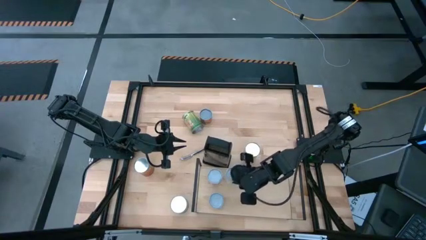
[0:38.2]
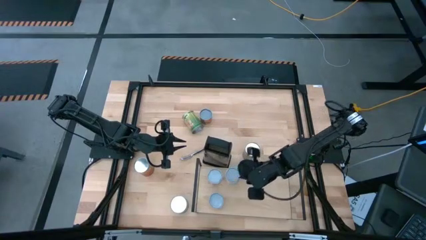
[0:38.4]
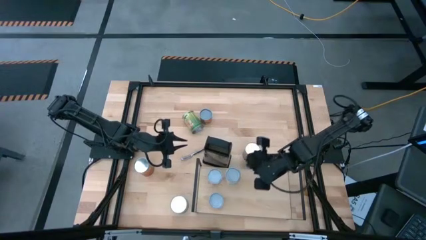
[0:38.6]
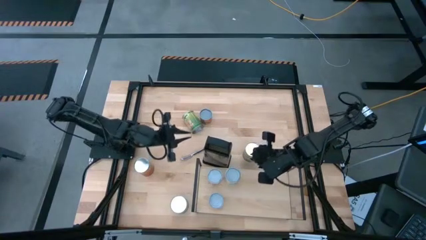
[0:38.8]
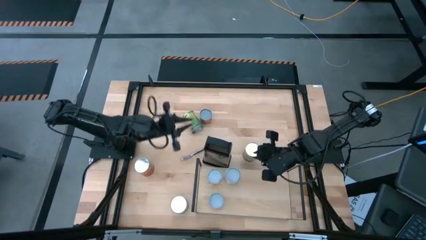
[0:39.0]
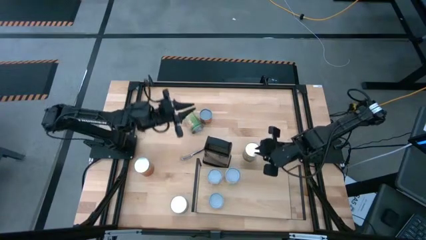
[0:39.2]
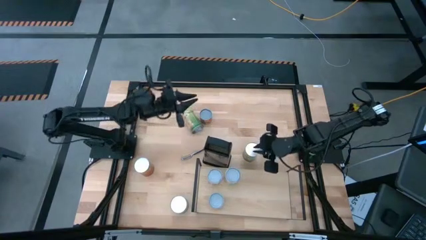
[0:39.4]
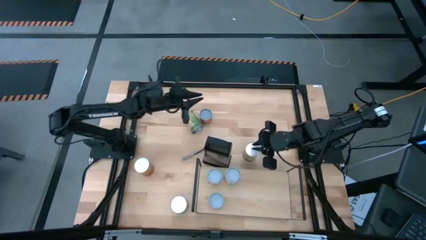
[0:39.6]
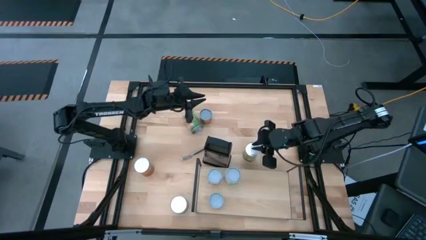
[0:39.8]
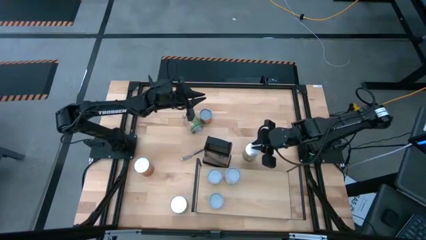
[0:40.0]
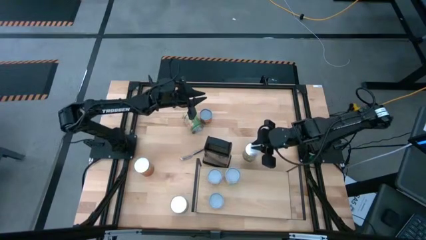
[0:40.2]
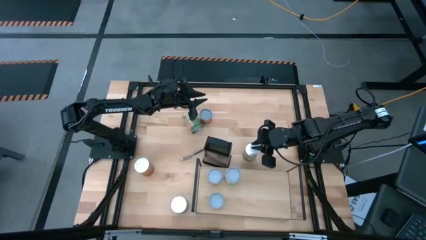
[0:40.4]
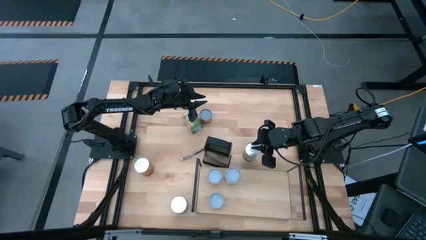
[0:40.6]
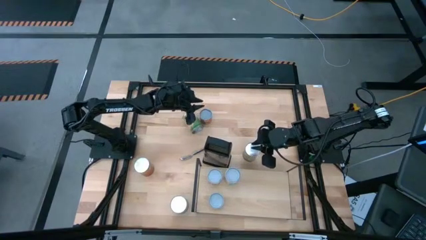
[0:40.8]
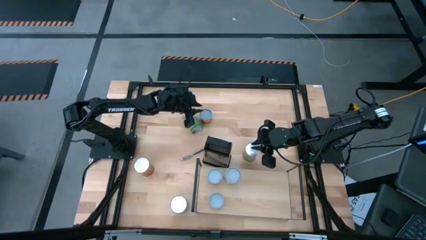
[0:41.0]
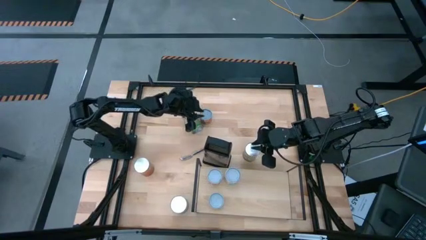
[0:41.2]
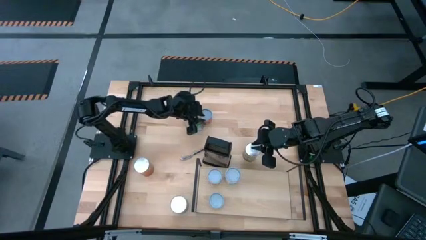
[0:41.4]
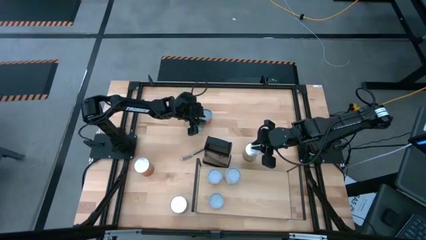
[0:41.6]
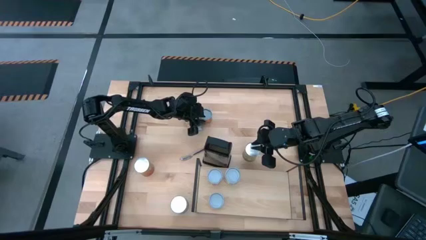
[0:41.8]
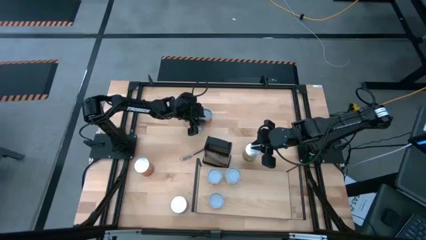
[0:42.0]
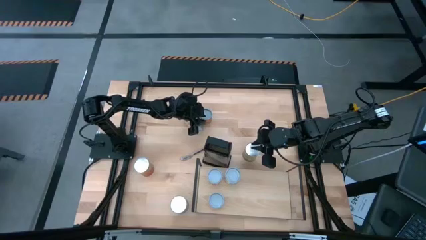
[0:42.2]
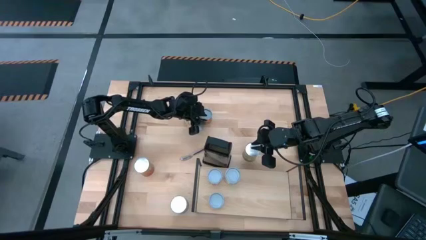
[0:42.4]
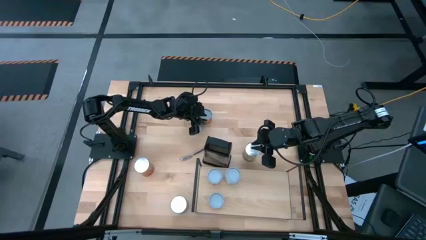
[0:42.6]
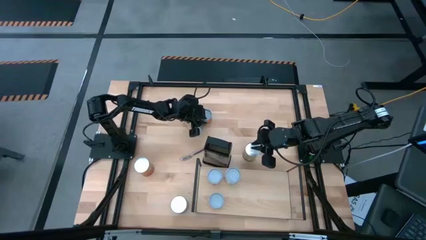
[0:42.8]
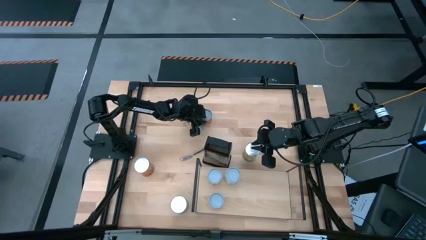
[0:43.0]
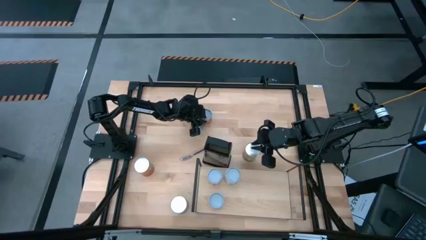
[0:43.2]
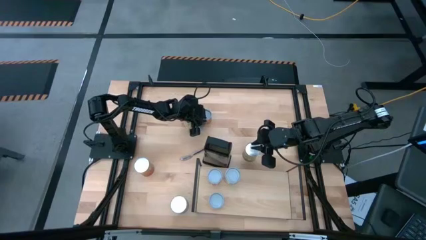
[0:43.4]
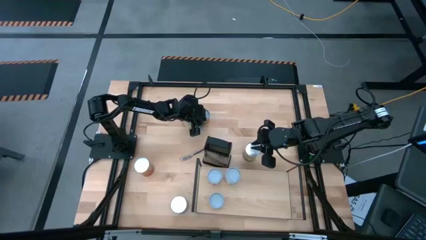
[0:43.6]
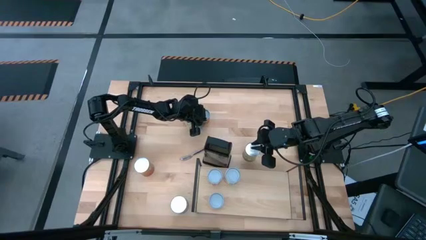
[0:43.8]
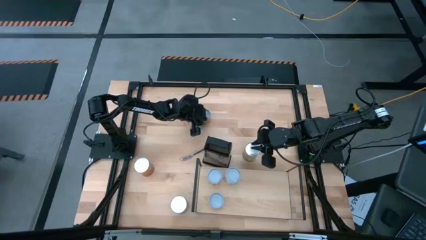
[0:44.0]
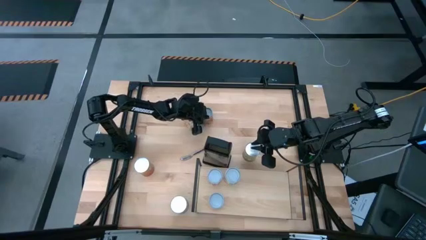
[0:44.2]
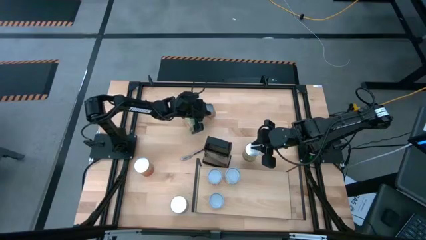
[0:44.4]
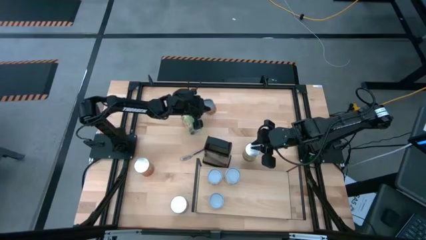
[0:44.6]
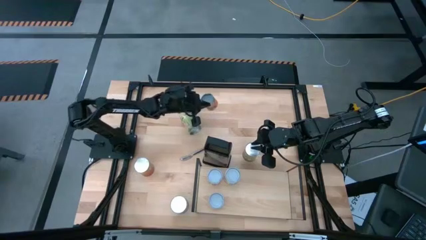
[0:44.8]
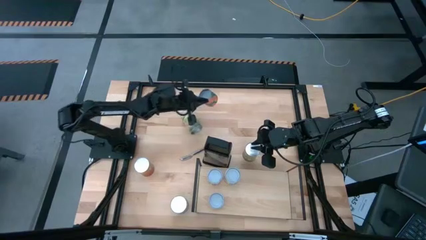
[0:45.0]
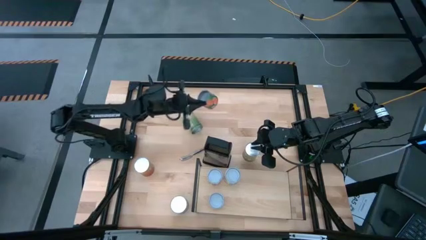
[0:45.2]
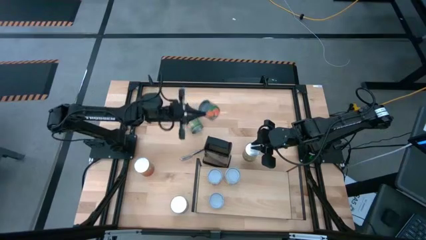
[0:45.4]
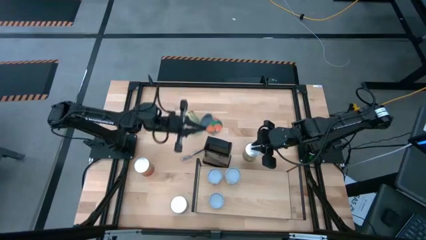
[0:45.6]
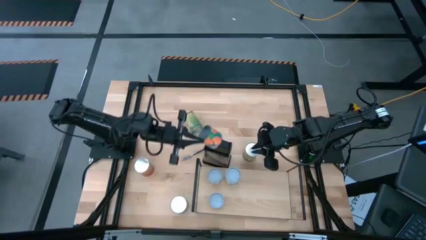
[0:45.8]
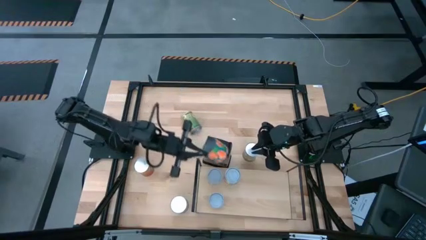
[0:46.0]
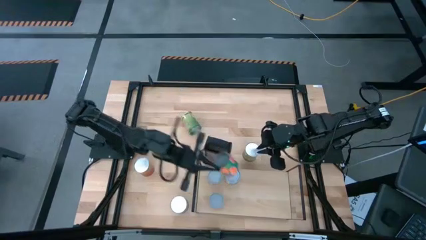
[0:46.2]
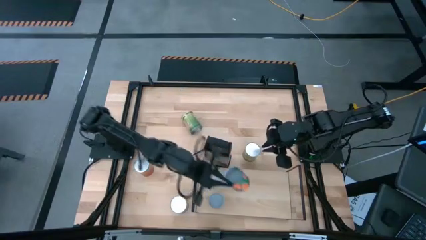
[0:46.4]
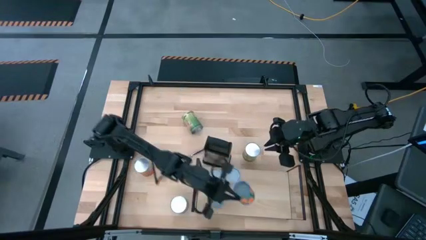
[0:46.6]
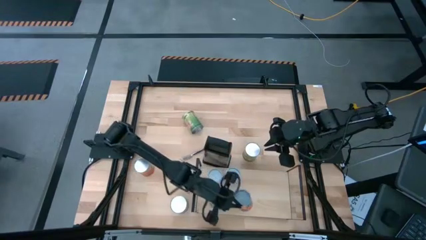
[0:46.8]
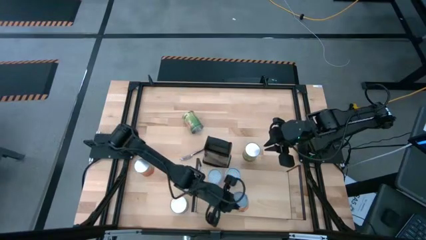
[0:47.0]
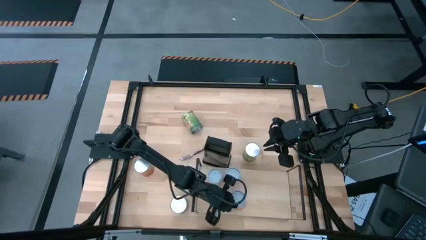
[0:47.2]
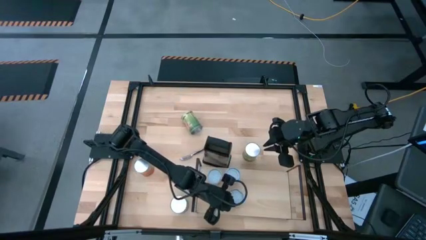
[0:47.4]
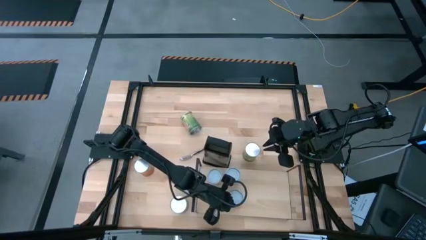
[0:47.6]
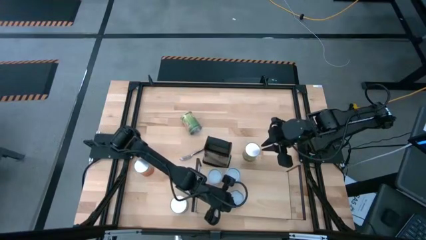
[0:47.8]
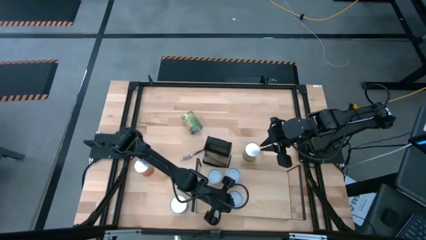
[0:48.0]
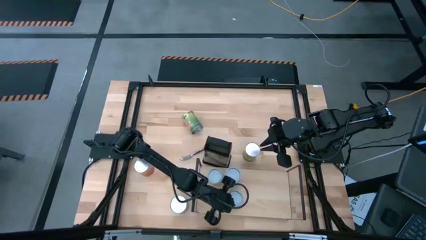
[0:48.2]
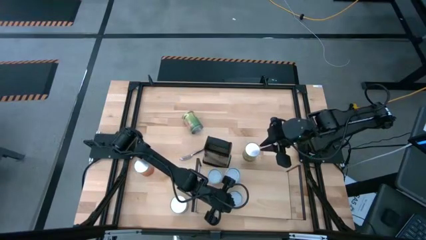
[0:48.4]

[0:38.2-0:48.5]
Task: Pick and place cans onto a shelf
Put the canned mandarin oranges on the shelf

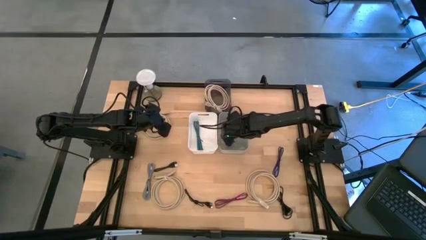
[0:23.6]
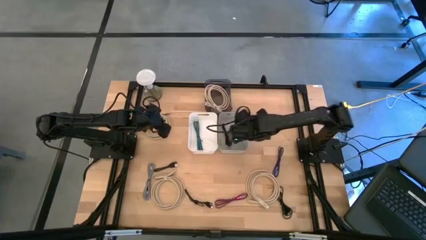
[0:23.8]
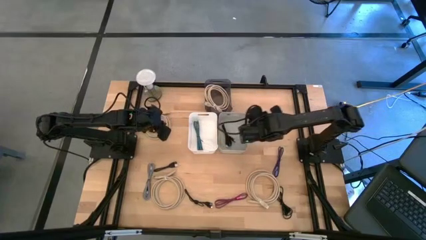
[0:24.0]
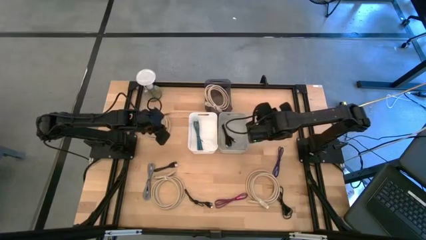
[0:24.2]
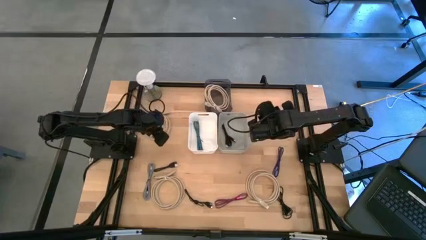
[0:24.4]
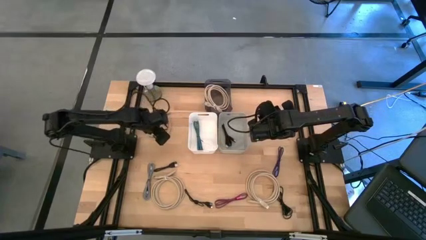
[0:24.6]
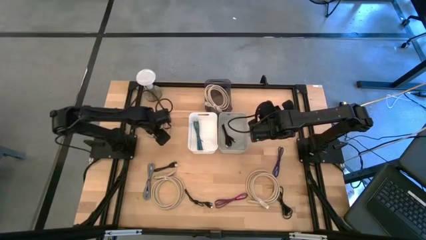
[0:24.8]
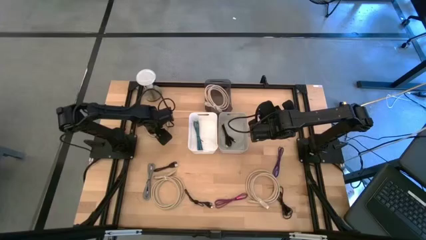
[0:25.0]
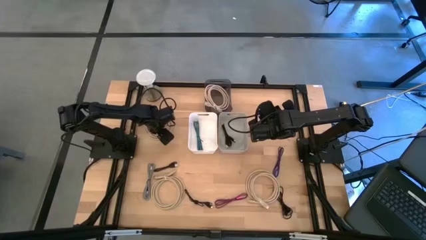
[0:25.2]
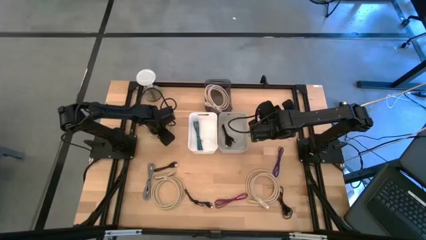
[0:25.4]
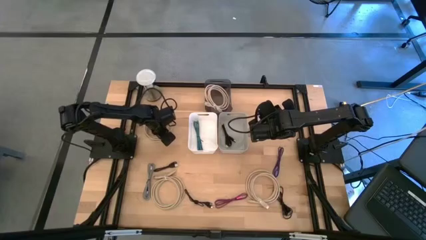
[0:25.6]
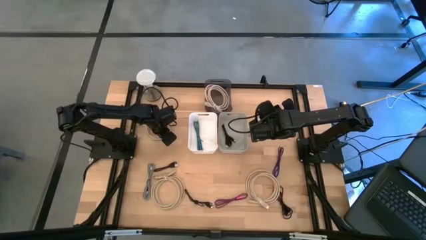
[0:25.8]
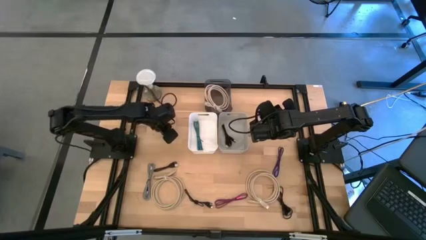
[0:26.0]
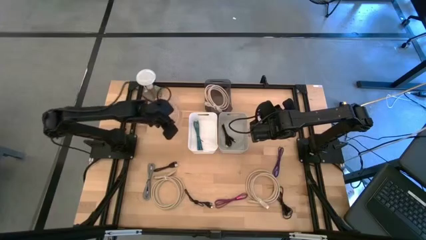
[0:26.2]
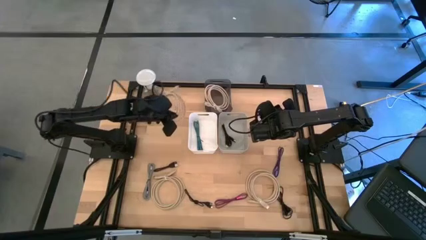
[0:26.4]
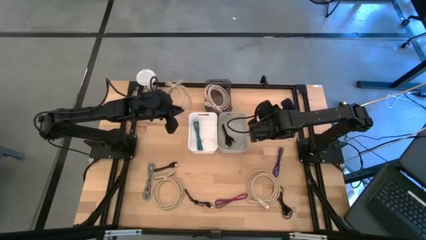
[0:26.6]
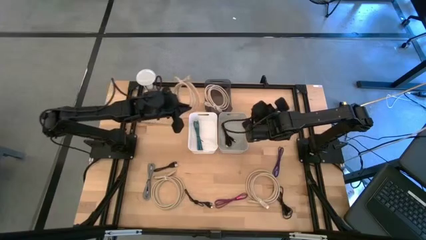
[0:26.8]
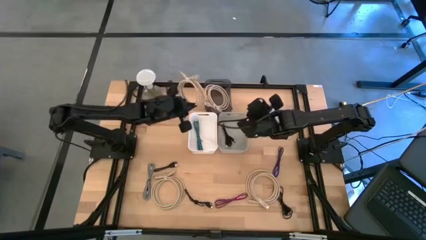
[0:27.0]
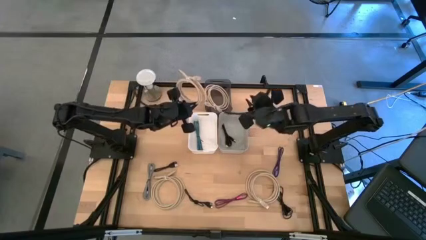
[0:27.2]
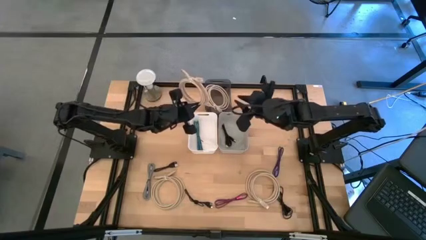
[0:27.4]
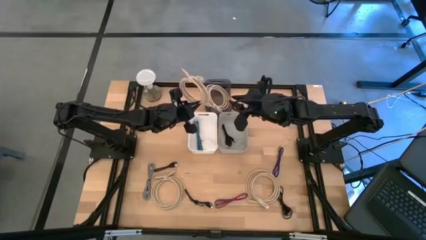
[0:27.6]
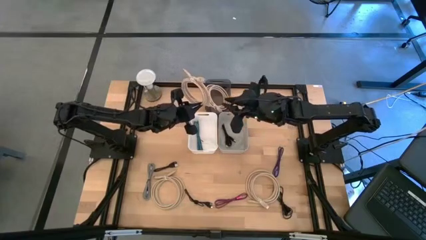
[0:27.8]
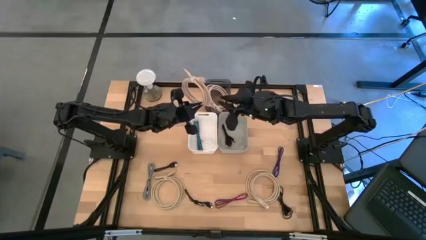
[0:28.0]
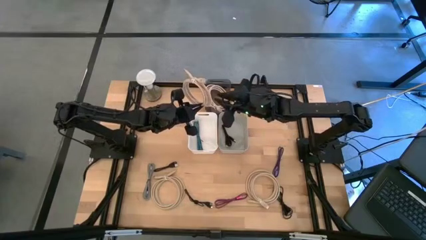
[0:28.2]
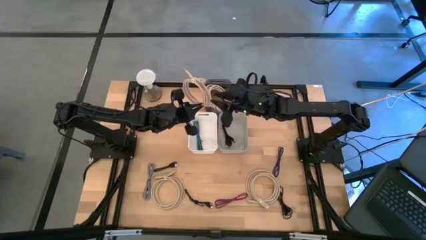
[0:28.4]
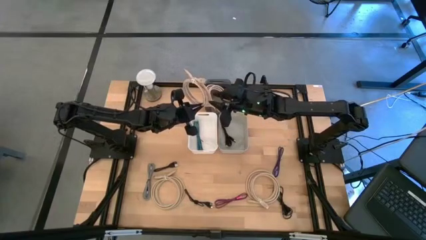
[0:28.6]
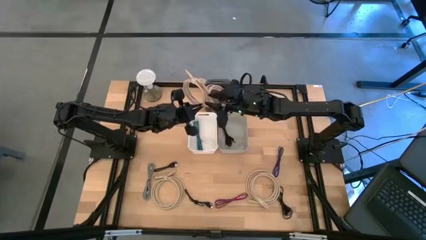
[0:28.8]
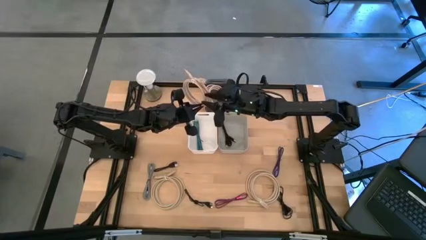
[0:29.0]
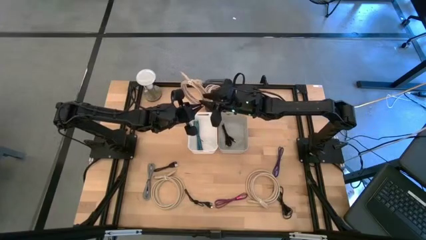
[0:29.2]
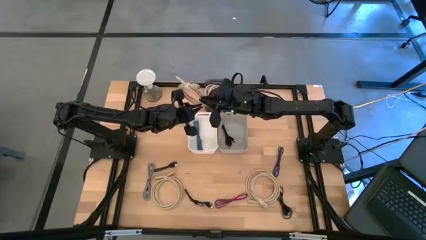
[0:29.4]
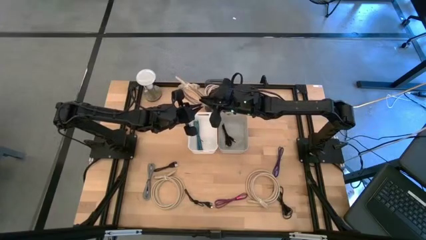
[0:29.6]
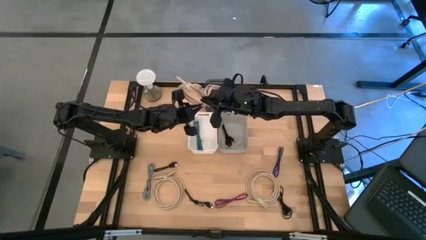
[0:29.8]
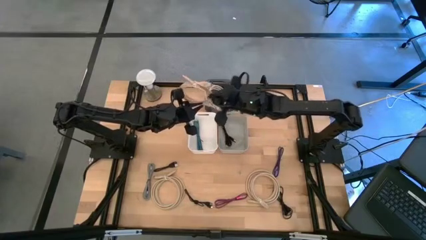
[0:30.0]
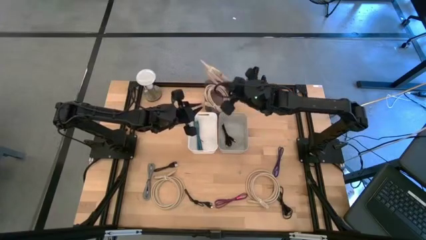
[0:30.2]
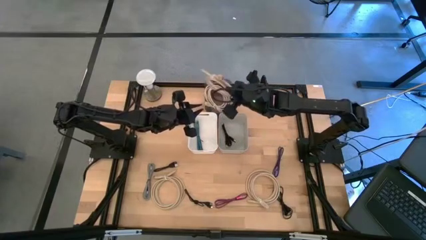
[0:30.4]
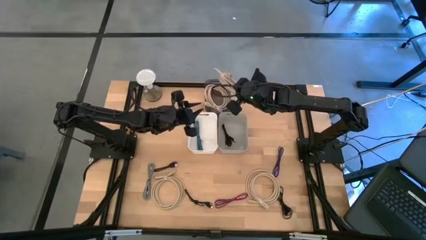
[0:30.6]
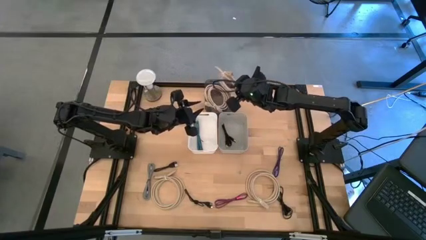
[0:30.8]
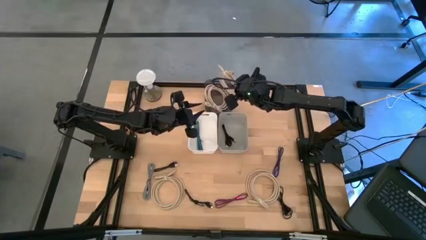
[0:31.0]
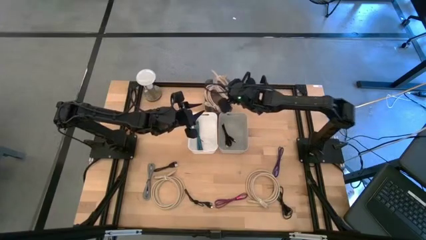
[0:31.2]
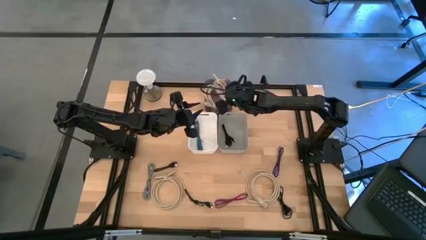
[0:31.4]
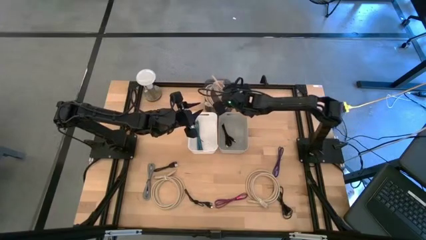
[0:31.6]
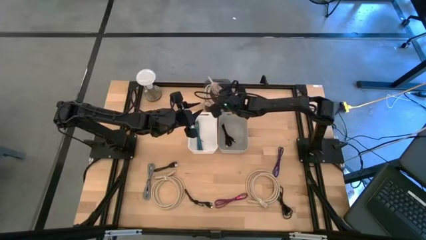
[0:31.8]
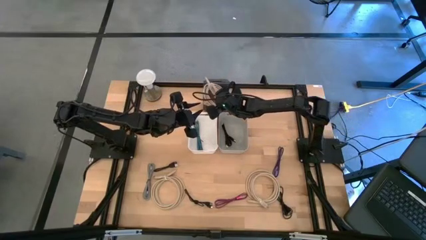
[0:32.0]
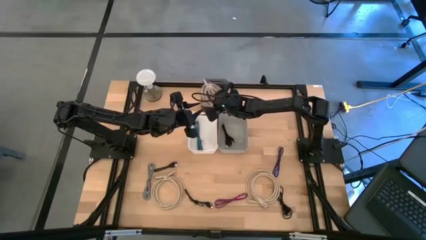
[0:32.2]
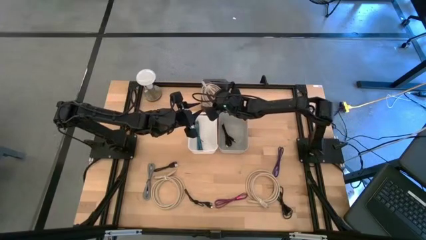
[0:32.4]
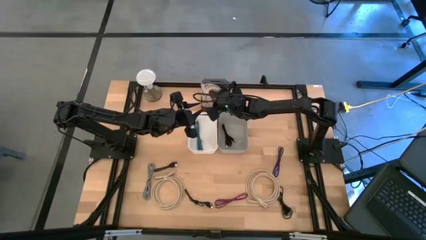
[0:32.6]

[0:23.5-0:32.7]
Task: Pick & Place USB Port
Put the light brown HDMI cable into the black bin
